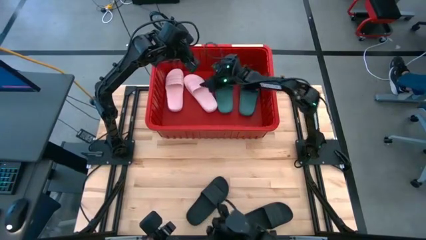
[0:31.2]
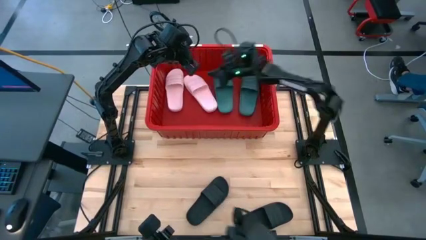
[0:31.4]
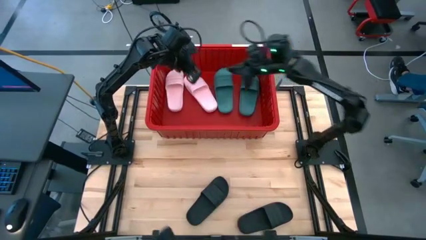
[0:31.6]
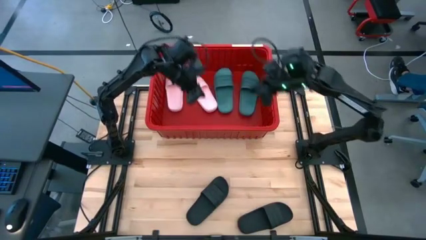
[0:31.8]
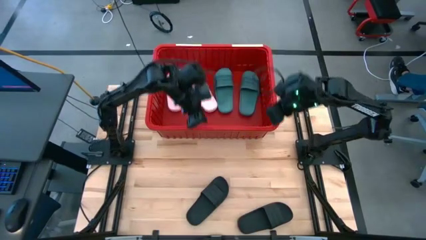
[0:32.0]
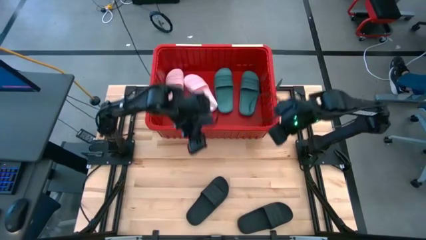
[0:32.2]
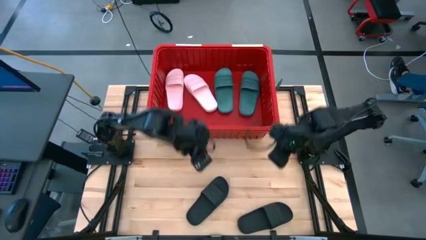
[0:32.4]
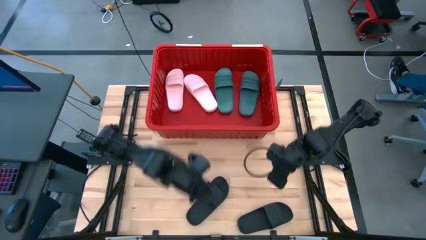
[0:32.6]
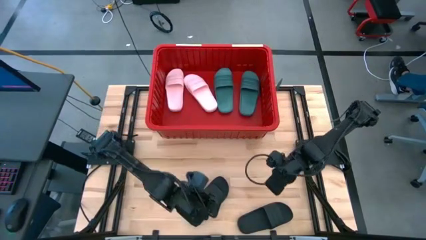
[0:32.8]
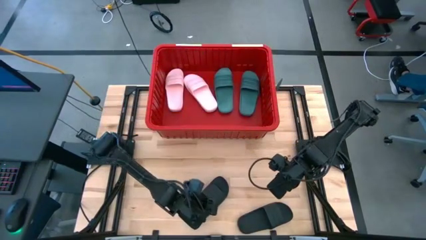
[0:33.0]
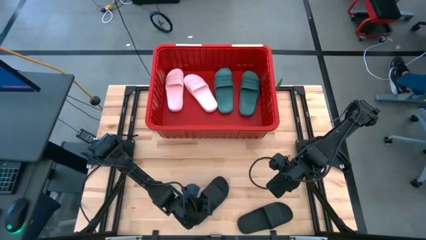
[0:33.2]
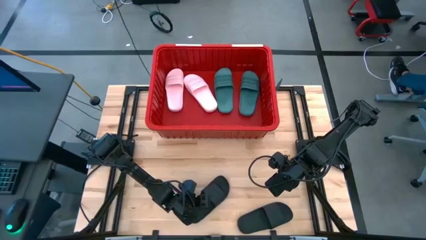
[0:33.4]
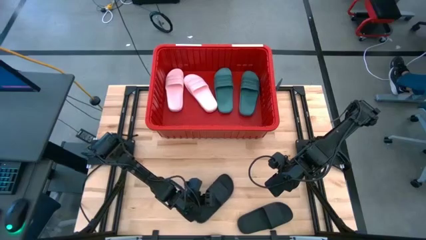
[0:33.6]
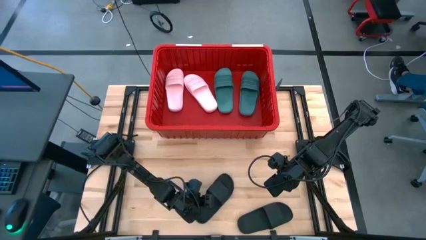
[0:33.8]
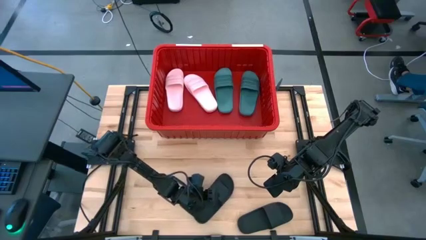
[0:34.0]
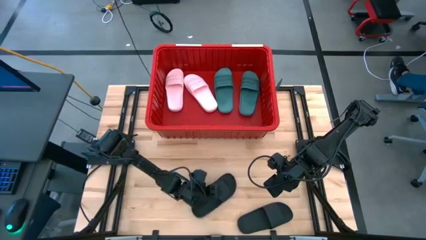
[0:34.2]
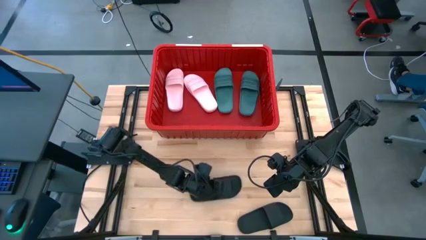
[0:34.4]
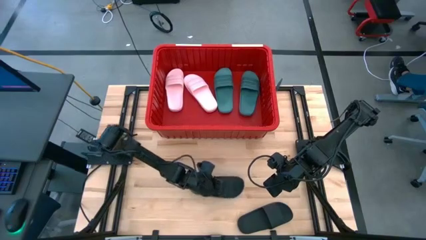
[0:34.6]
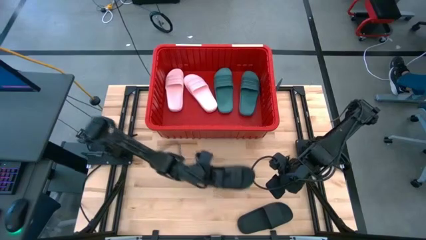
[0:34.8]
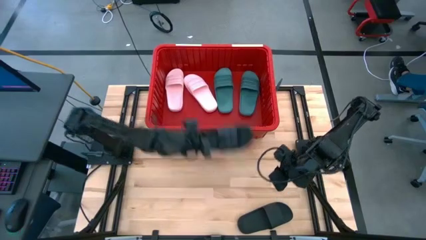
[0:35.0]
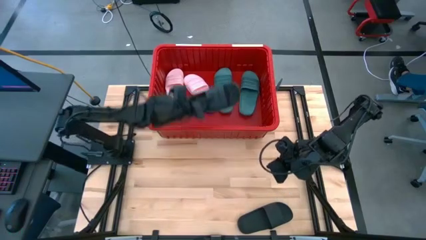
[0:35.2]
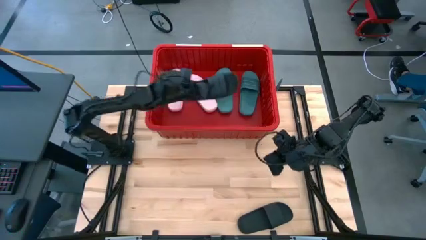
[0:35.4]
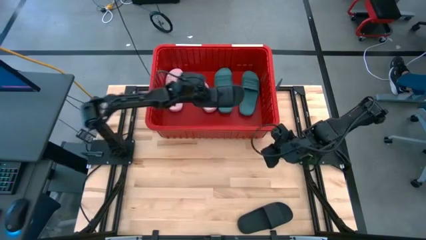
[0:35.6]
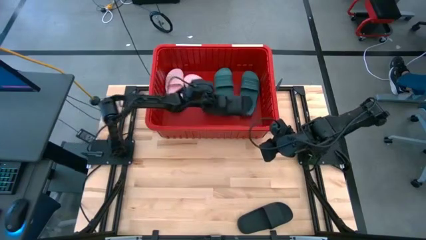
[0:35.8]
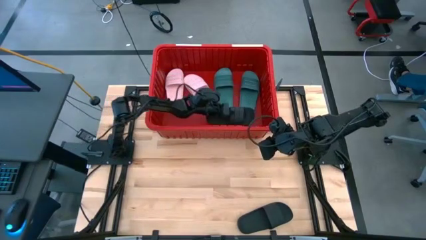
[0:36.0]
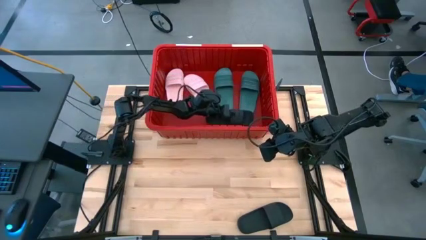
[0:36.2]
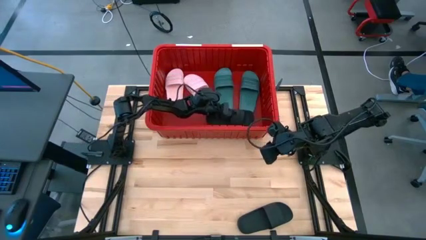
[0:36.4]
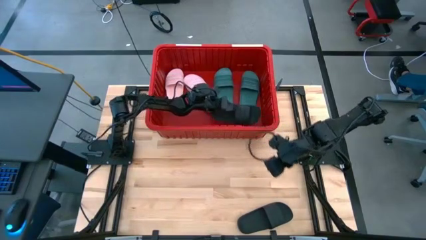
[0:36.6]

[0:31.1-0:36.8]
Task: Pick and place slides into bin
Put the top black slide into the red bin

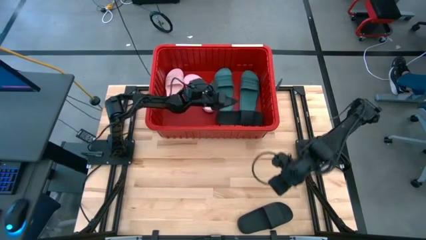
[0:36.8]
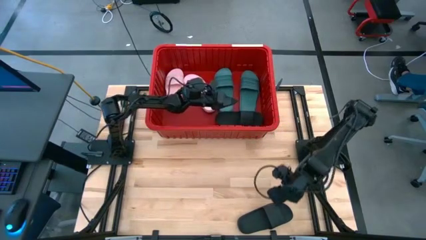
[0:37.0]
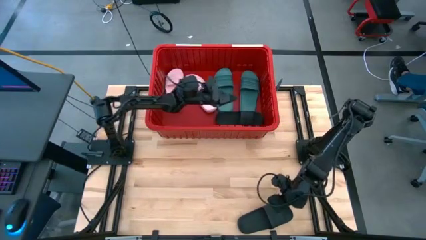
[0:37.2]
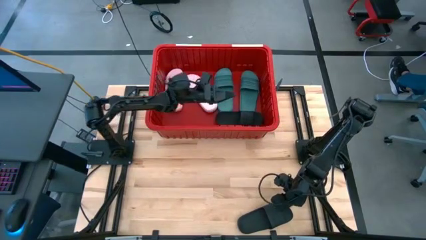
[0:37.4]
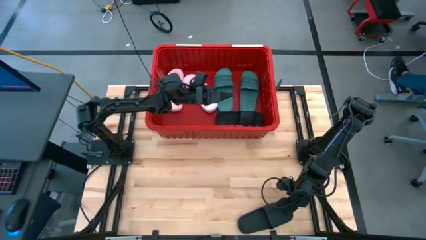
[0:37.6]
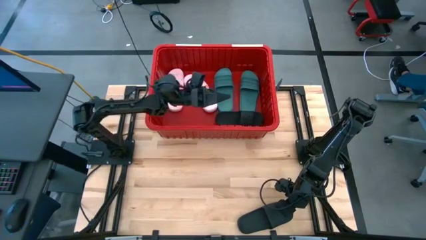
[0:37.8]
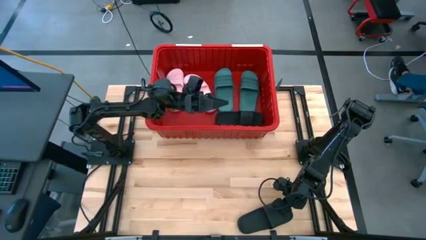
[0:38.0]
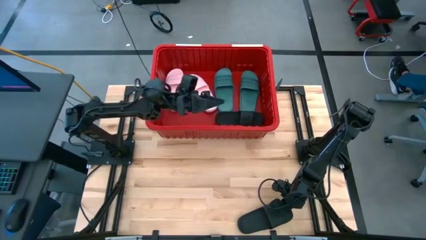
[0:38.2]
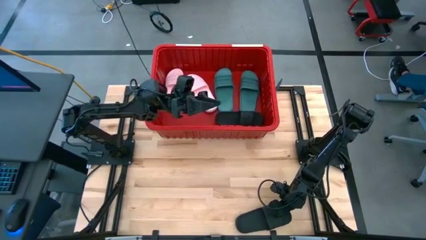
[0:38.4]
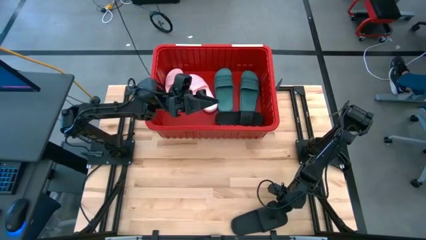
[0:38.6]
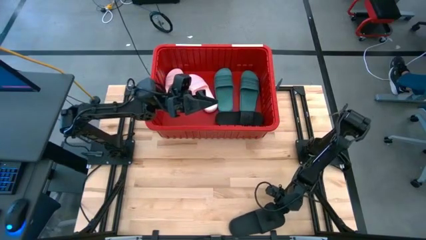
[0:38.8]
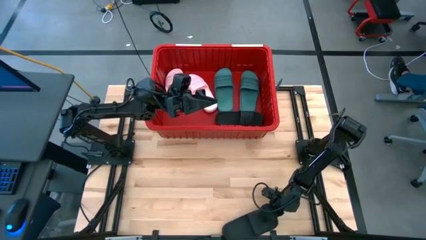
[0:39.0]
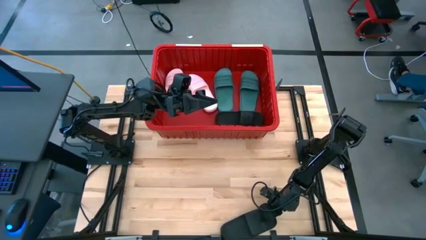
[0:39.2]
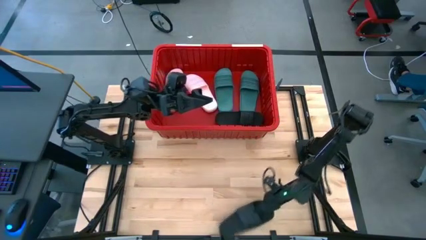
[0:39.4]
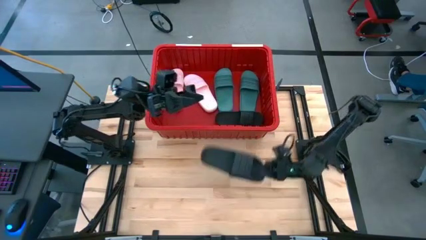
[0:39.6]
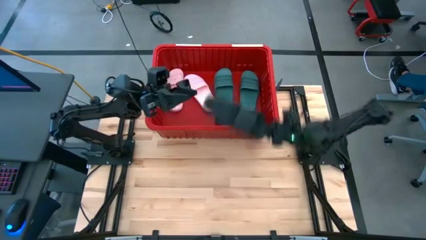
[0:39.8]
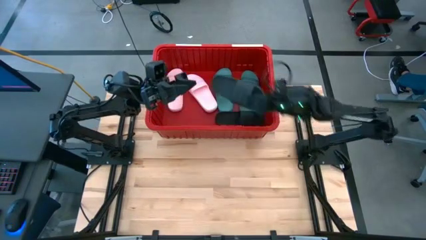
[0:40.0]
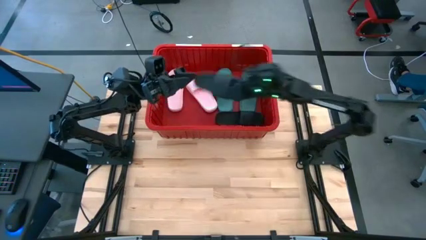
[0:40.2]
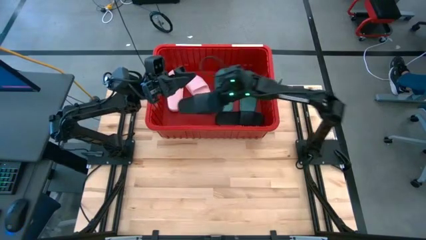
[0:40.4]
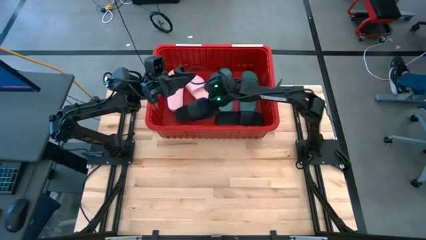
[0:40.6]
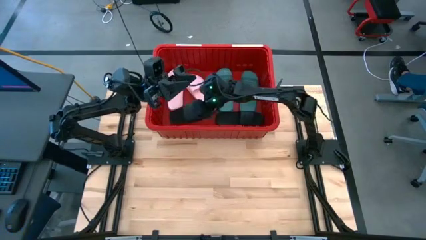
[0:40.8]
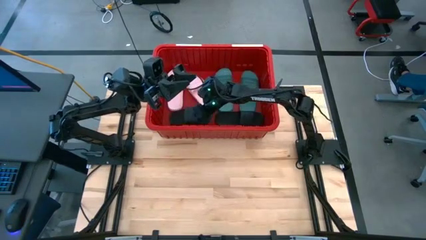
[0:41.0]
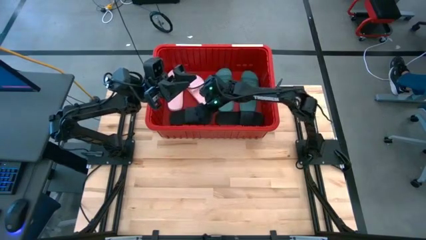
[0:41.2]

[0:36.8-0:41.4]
Put the black slide into the red bin

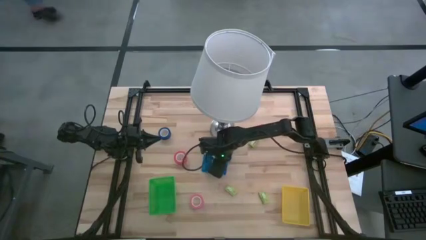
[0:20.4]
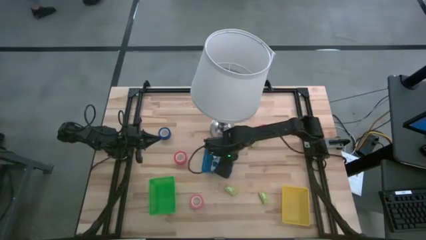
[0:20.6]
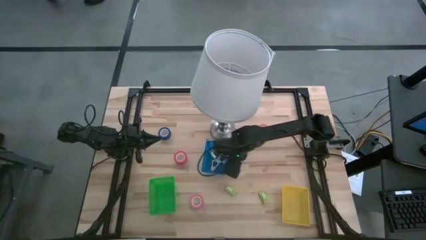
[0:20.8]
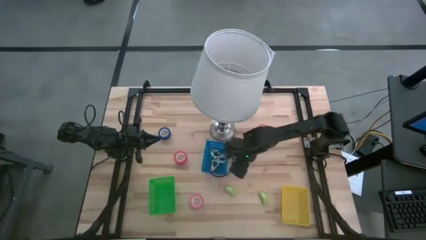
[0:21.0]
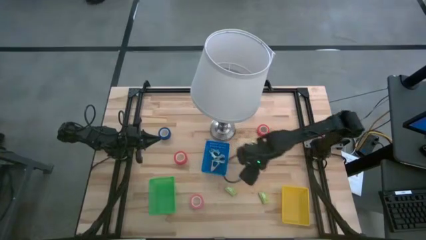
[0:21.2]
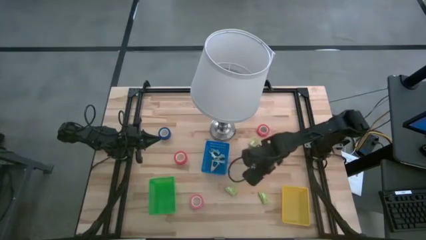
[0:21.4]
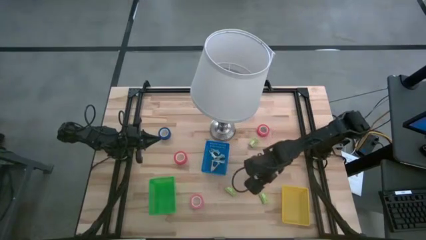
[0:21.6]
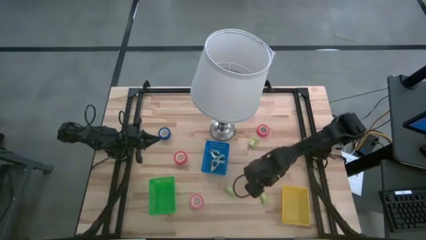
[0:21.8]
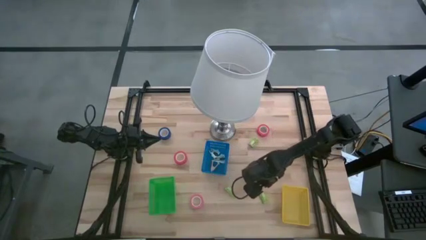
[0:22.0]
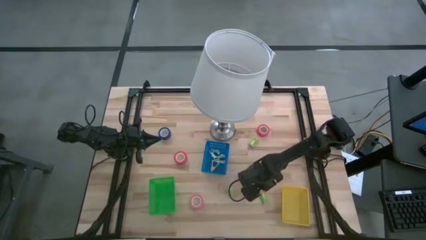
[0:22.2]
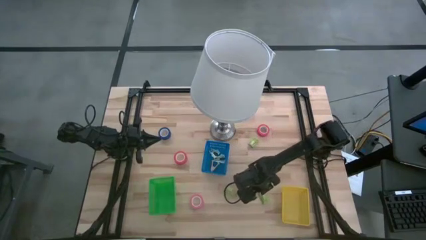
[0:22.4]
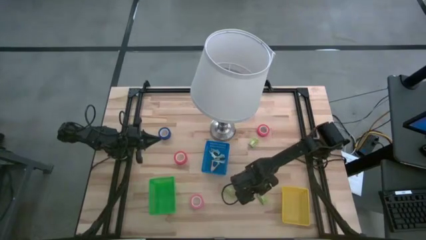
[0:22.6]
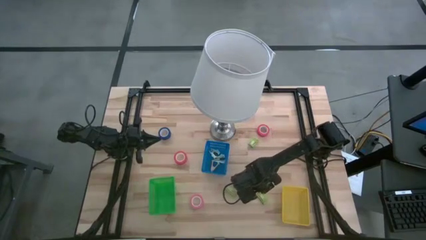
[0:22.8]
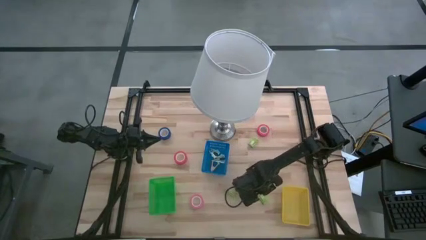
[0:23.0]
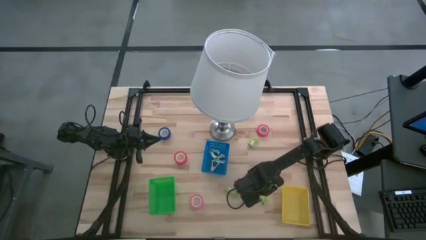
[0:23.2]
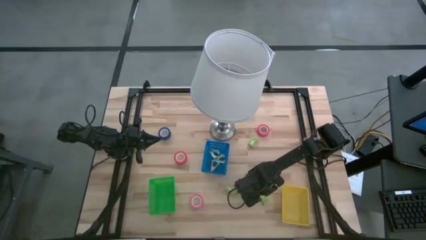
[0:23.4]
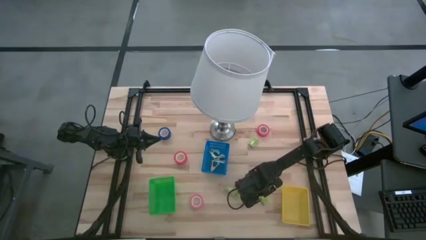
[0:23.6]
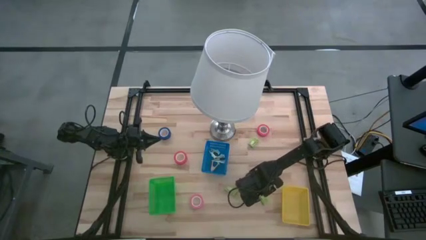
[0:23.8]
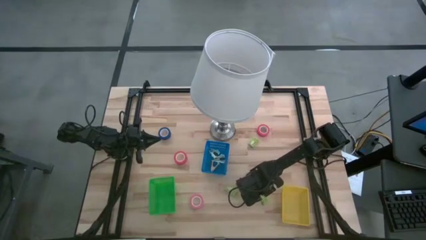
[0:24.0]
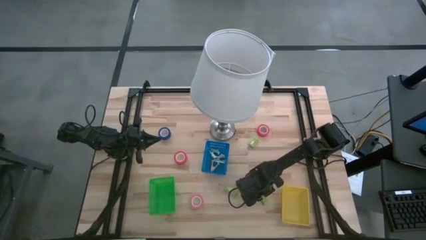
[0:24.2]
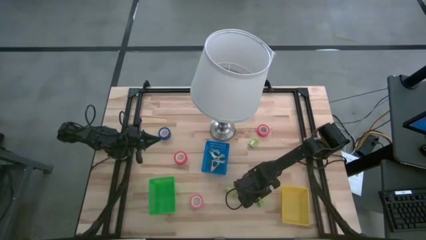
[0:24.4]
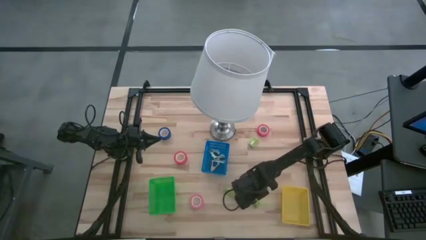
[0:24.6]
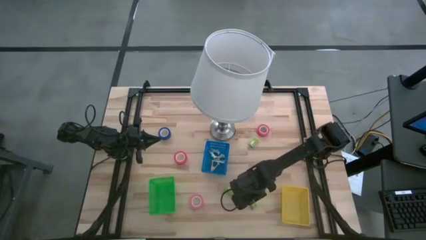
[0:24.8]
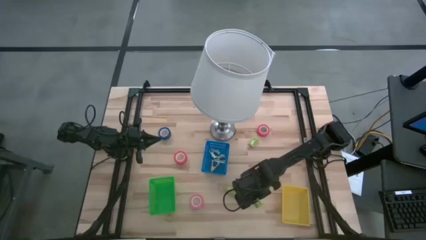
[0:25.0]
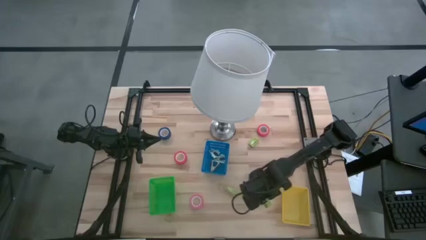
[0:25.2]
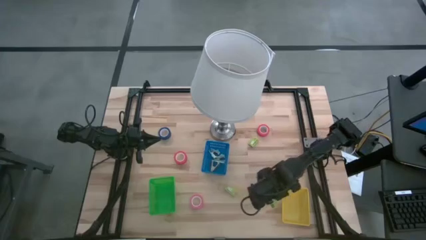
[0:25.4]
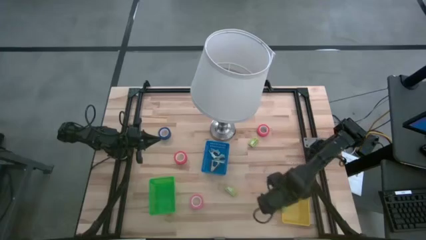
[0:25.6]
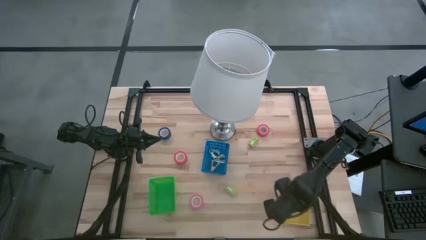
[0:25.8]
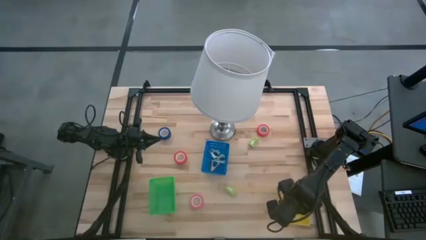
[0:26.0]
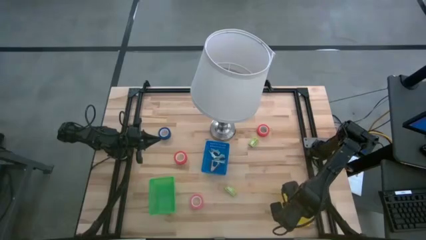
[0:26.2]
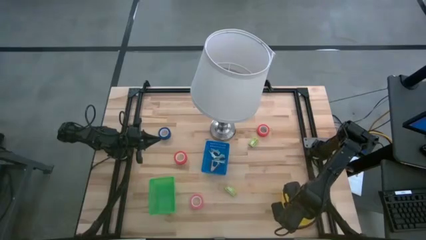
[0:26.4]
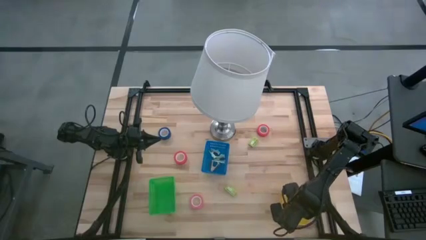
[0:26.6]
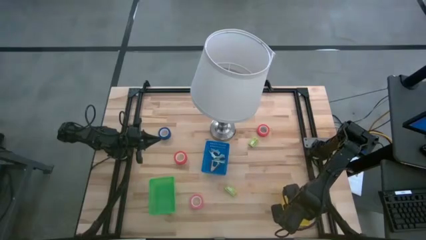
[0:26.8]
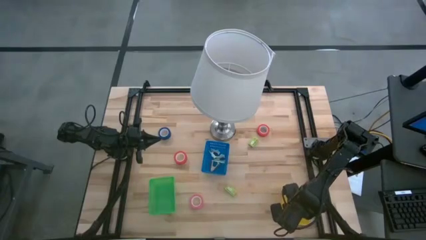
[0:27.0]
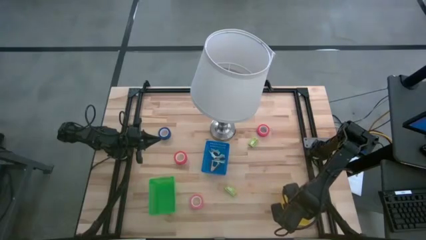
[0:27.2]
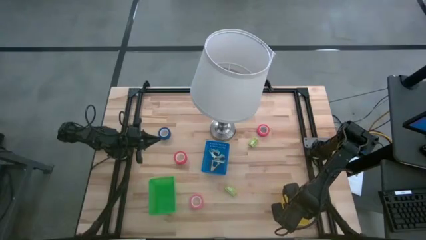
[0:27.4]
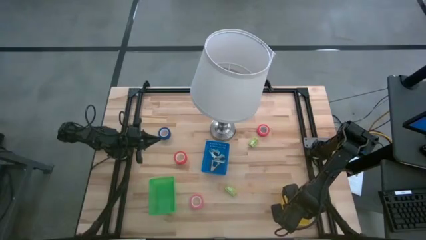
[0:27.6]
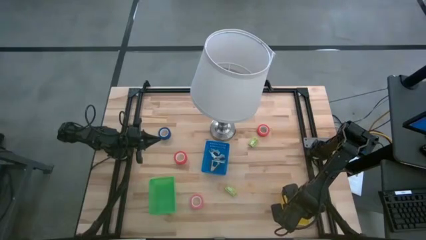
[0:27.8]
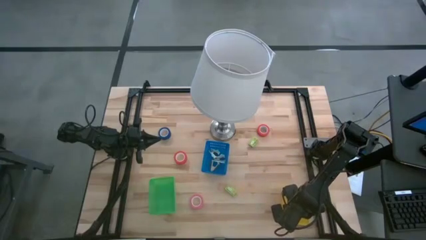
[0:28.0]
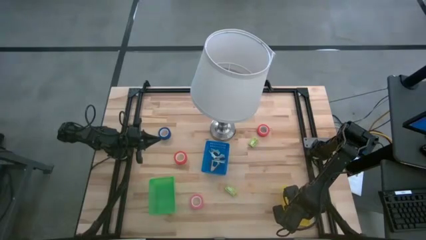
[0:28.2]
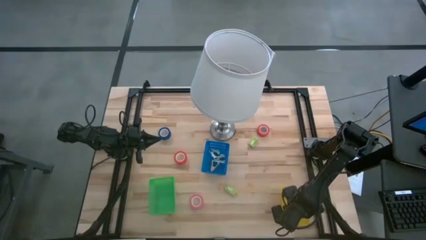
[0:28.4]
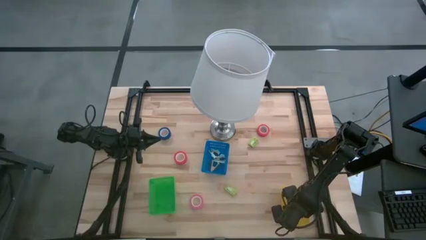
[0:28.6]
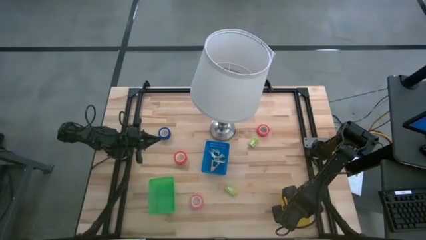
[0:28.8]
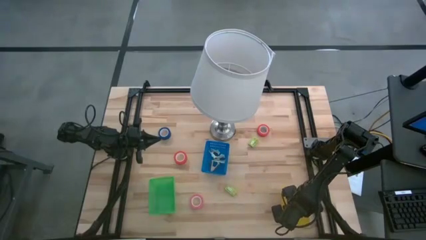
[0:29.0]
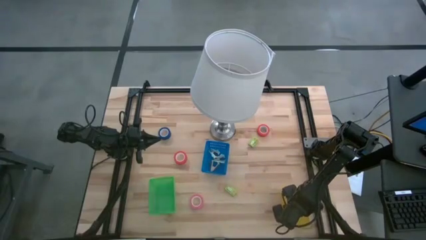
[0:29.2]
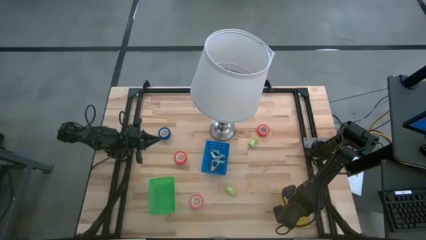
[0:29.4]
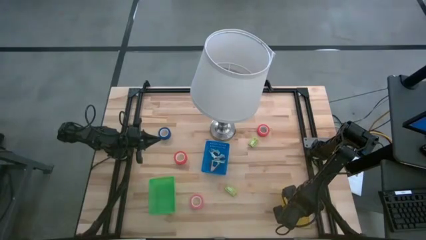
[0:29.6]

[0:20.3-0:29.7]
Task: Pick and place Stapler, Stapler remover, tape
Put the bottom right green staple box into the yellow bin
